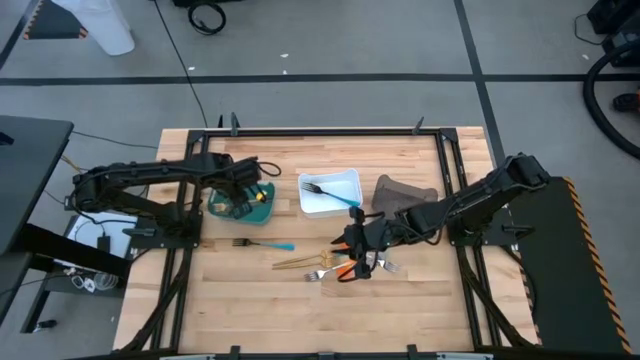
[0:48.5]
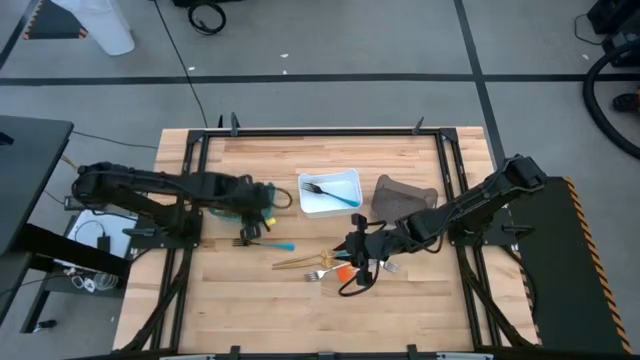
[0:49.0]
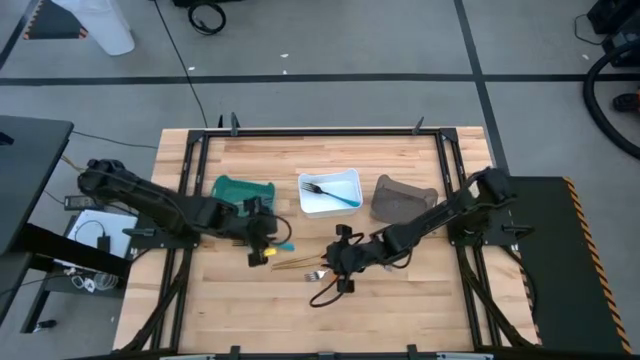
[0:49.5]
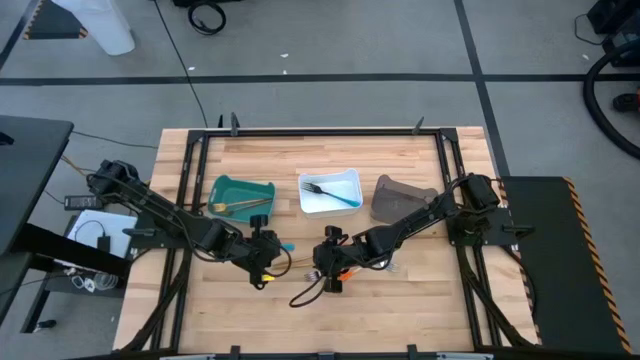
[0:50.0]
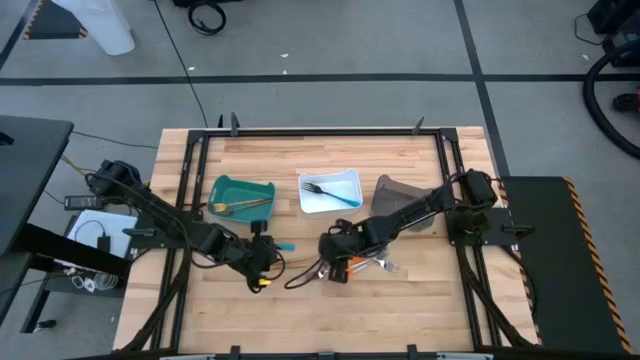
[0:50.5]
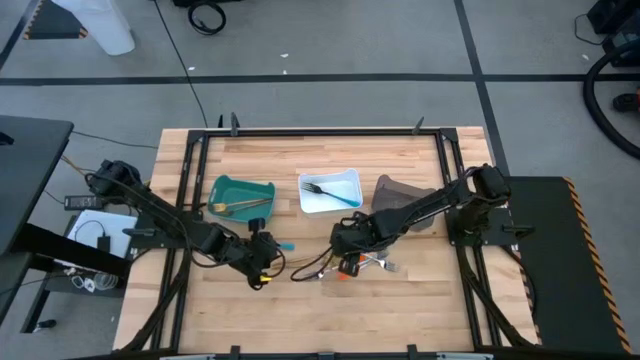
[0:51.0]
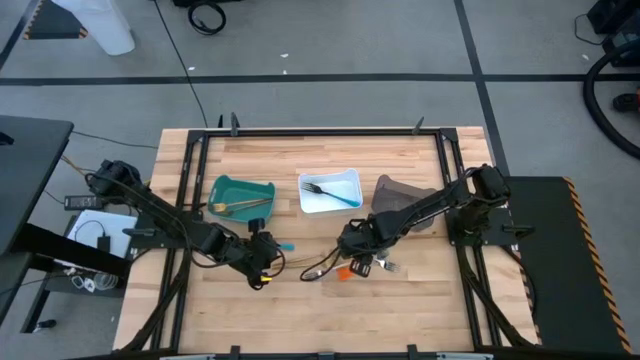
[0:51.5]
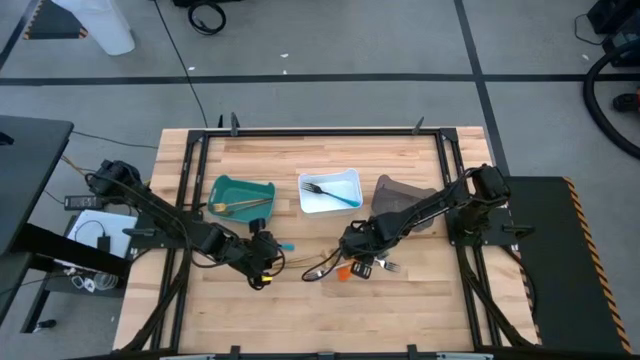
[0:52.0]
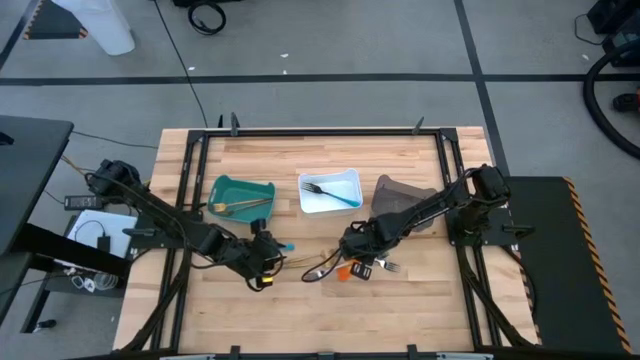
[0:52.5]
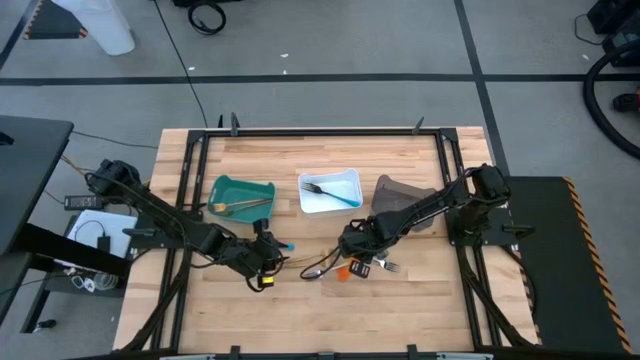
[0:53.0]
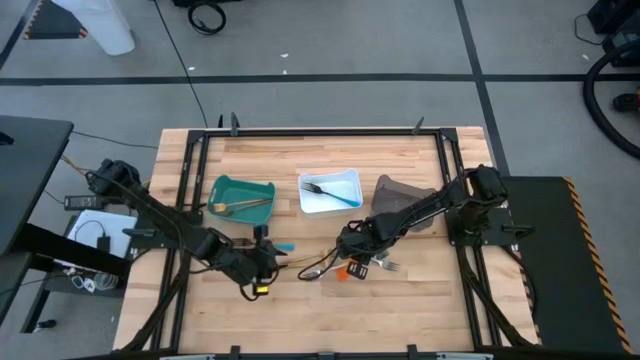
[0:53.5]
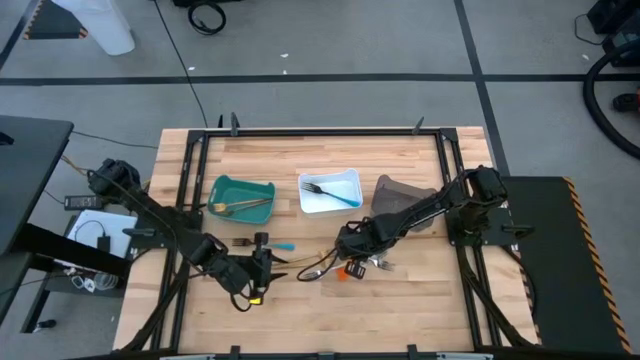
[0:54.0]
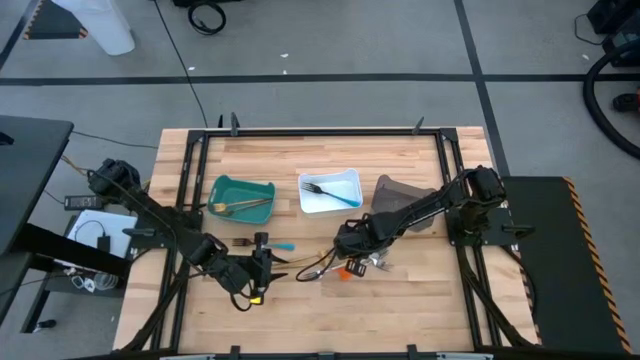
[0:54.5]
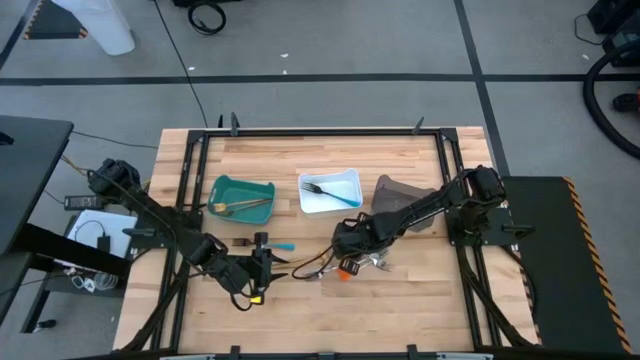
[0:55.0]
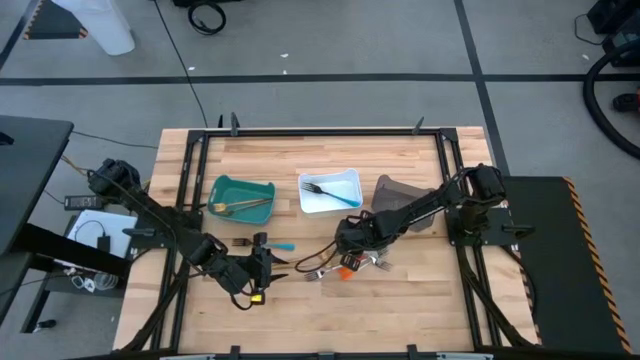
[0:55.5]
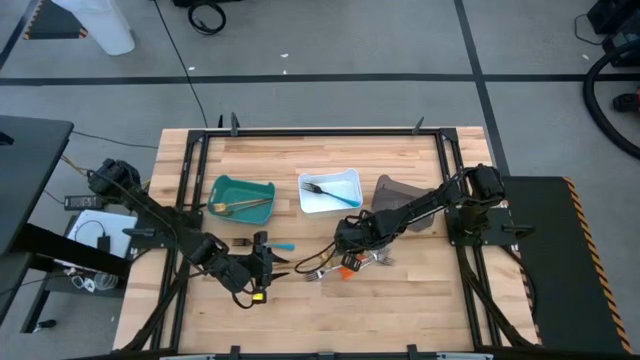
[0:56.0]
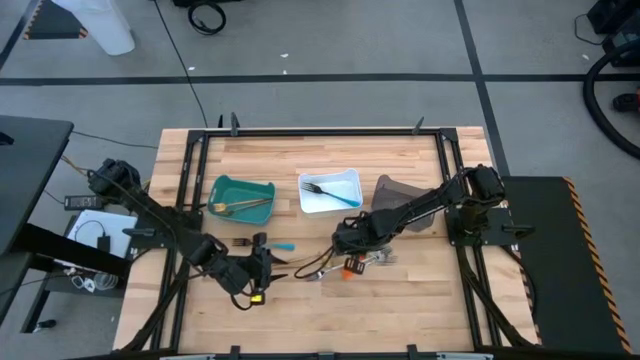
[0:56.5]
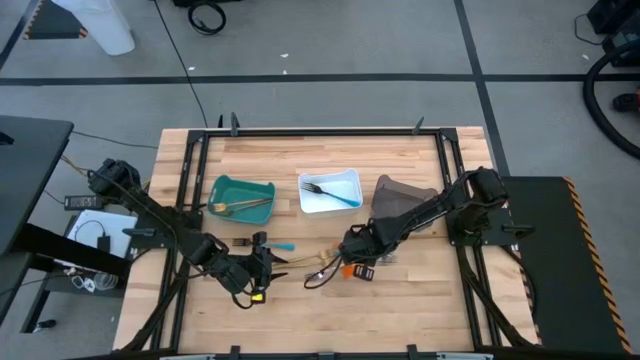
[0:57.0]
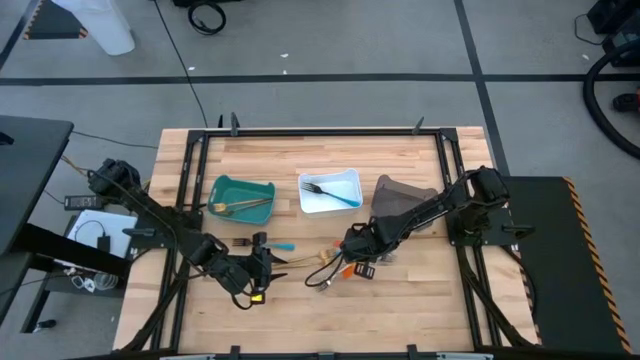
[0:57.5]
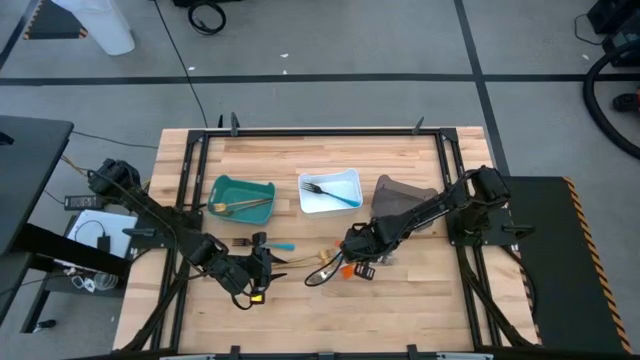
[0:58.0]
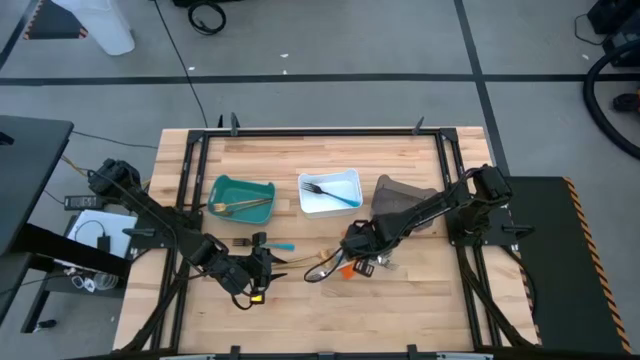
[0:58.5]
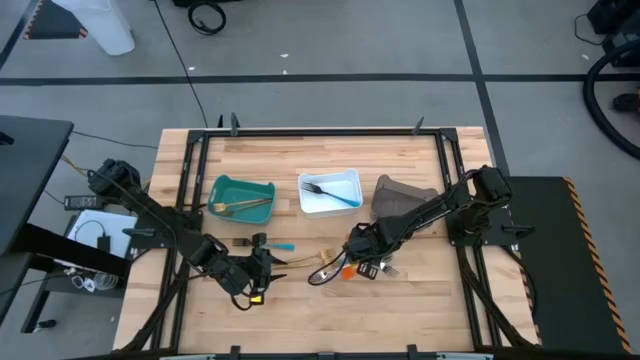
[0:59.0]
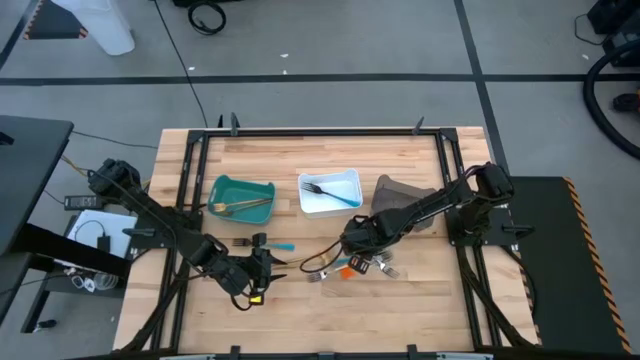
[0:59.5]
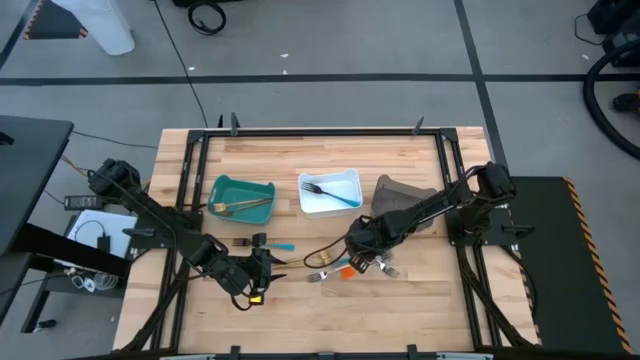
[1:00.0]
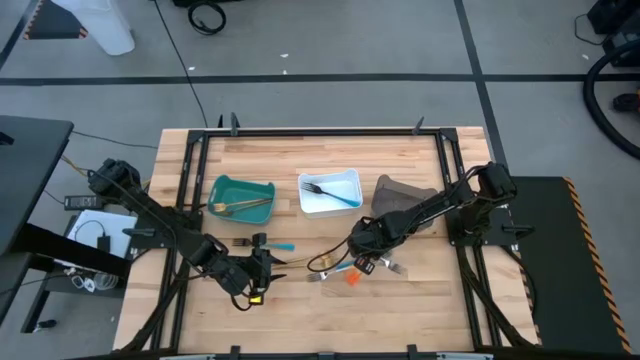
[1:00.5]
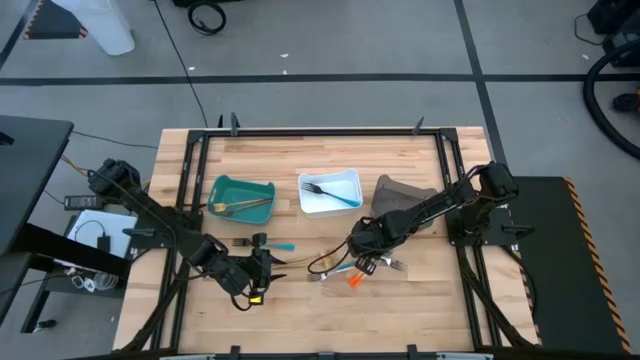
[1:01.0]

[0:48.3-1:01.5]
Task: Sort silverware by color (type)
Put the orange fork into the black bin

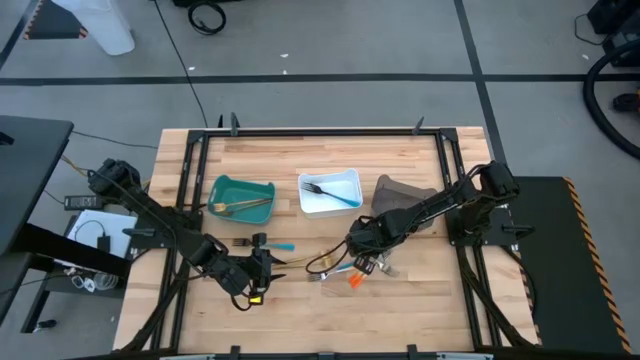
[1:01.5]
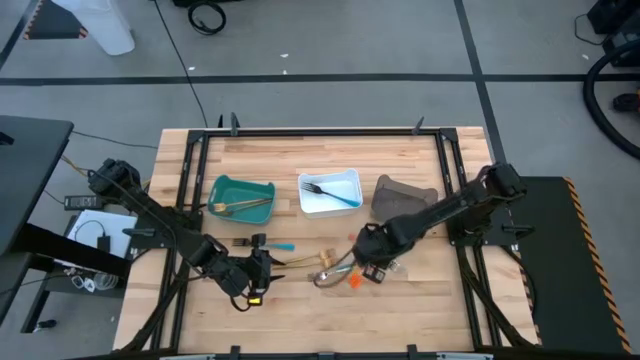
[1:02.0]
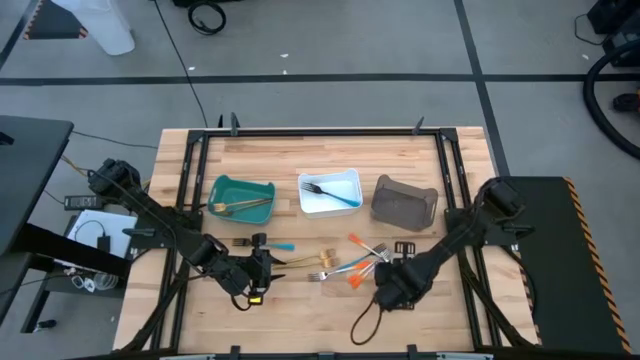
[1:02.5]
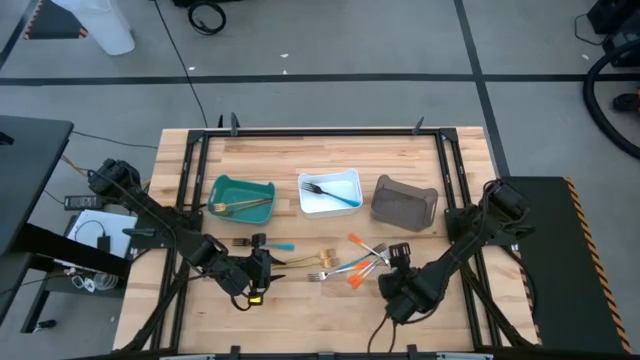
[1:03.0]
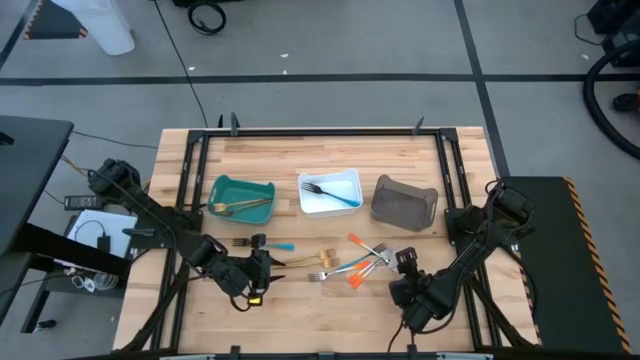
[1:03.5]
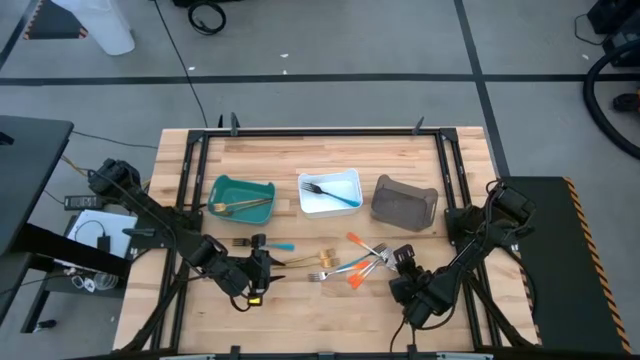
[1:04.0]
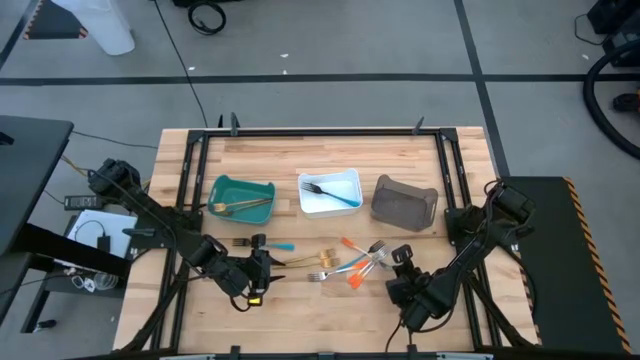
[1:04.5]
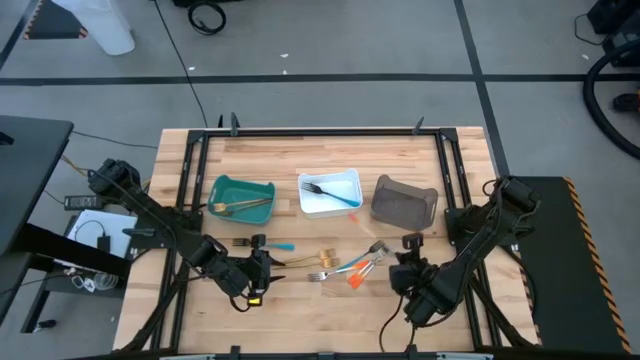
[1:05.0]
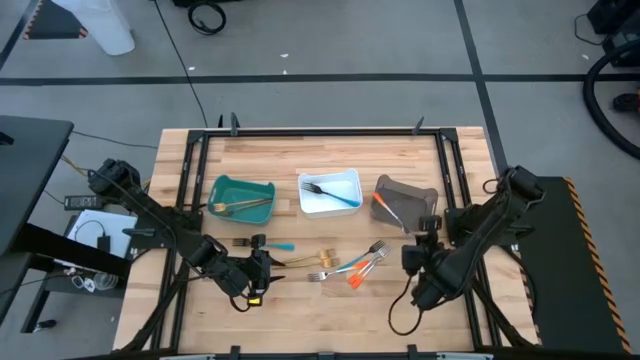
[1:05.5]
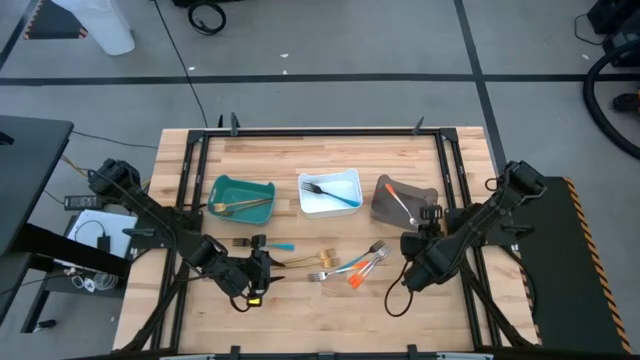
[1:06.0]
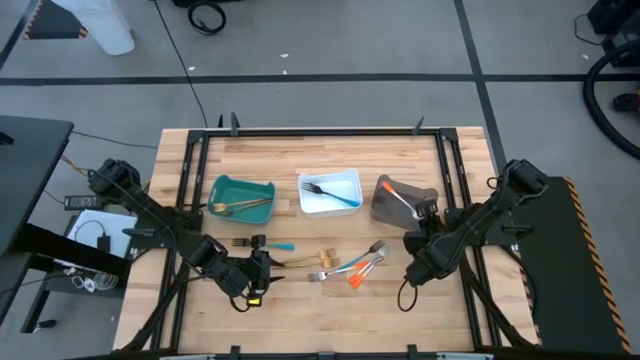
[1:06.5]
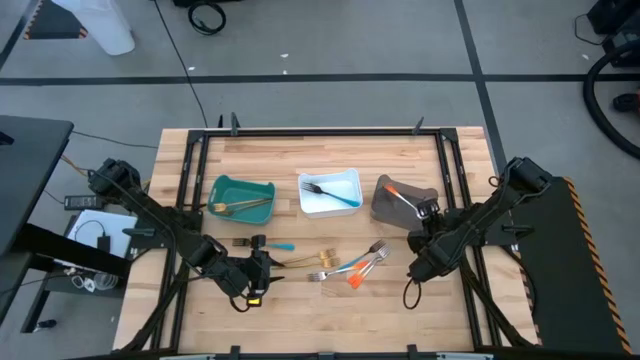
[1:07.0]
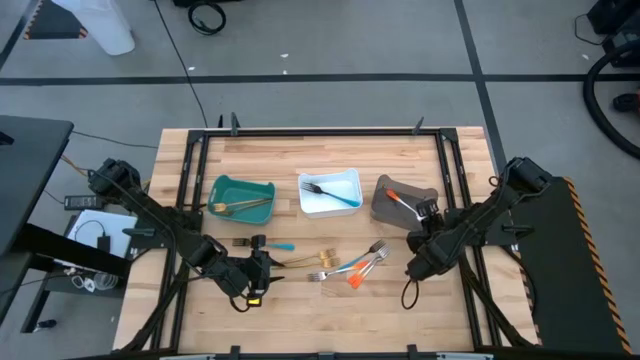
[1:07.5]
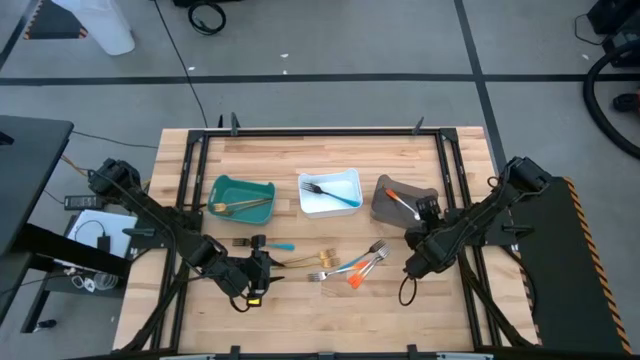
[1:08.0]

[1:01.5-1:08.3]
Put the orange fork into the black bin

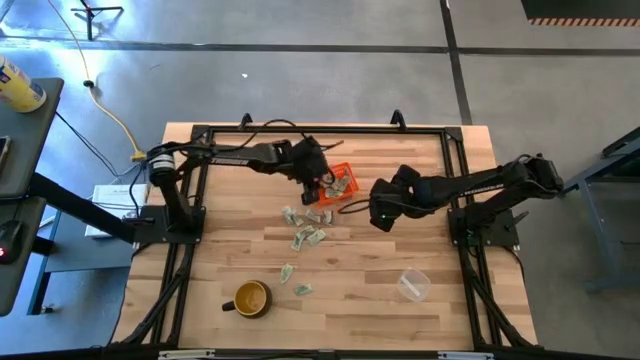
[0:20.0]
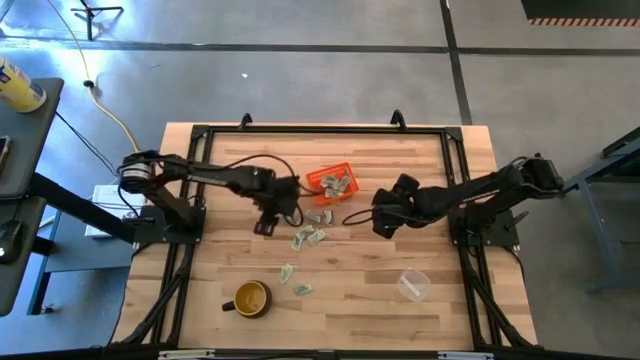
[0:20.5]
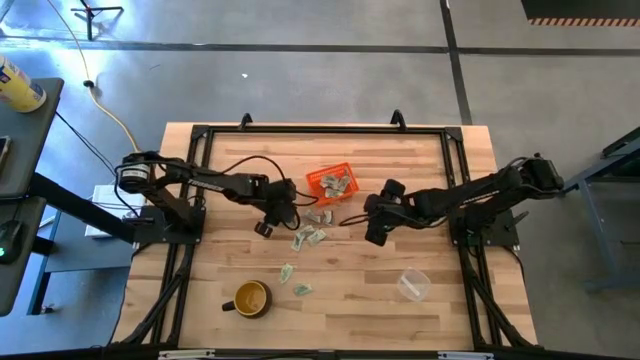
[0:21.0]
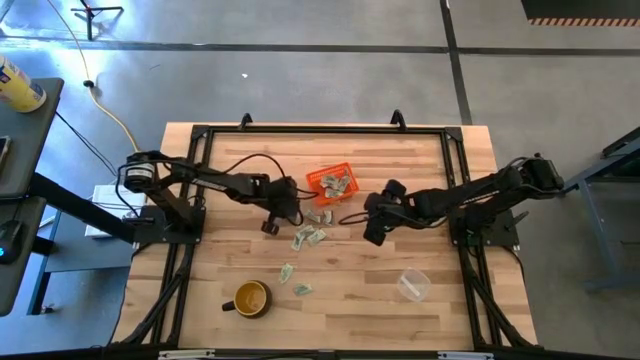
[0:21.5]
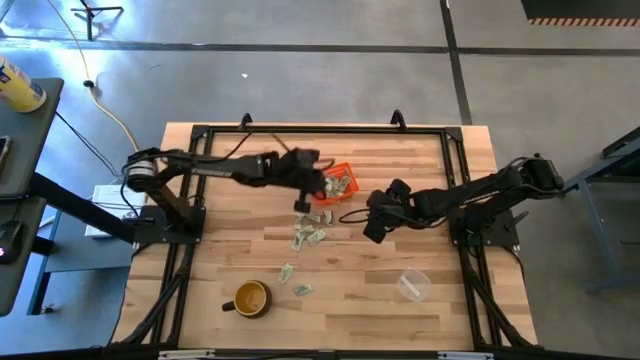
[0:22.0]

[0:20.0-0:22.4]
Task: Pick and place items into bin
Put the white stevia packet into the orange bin
